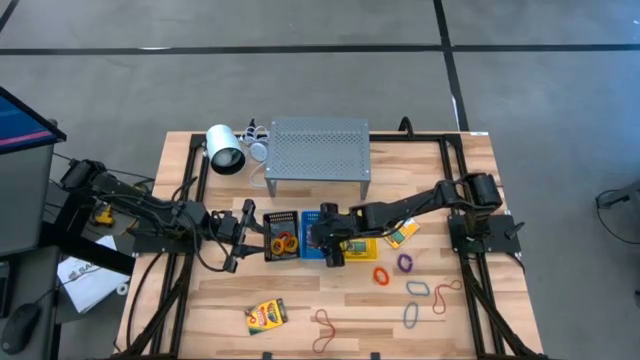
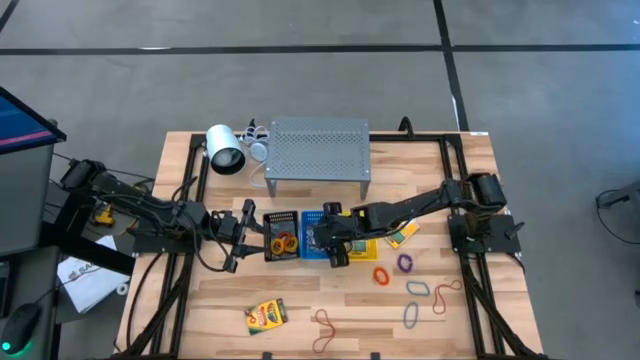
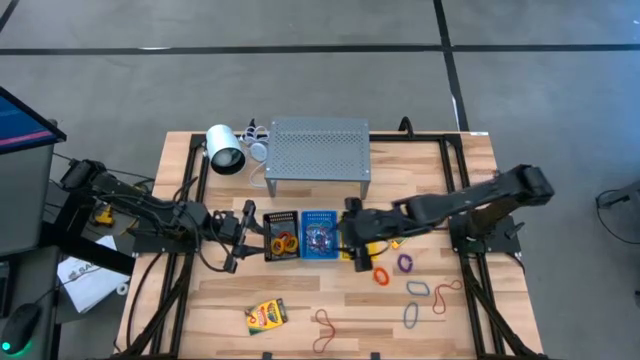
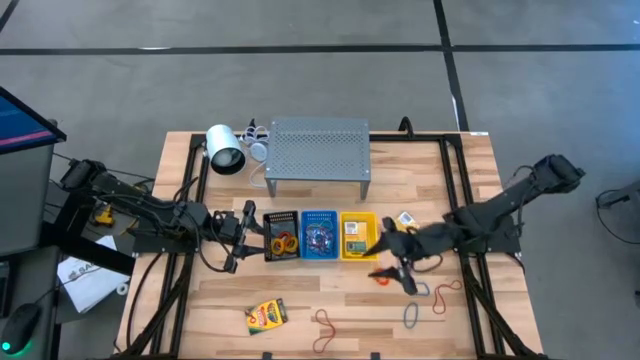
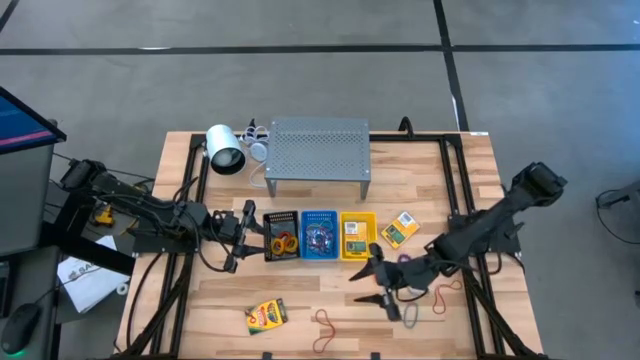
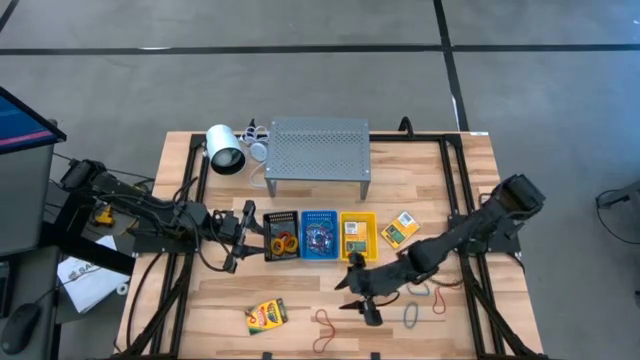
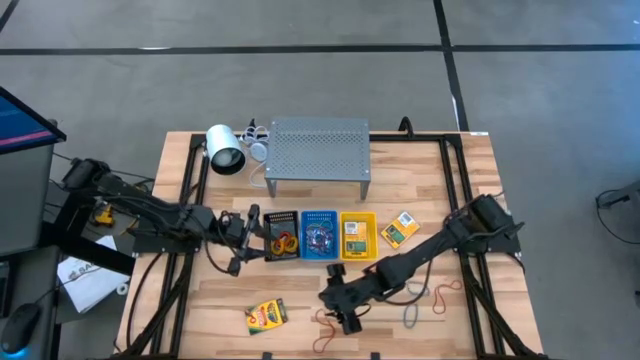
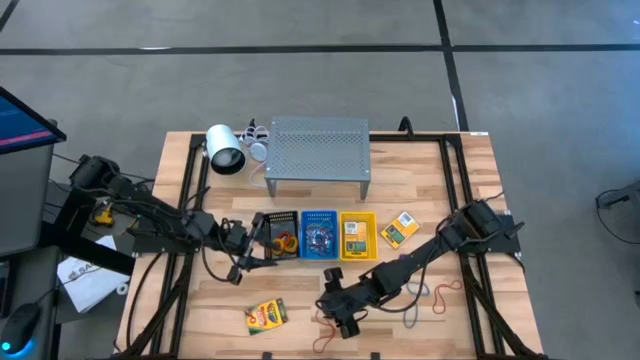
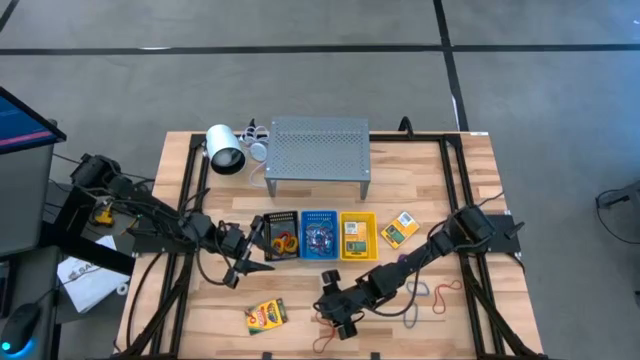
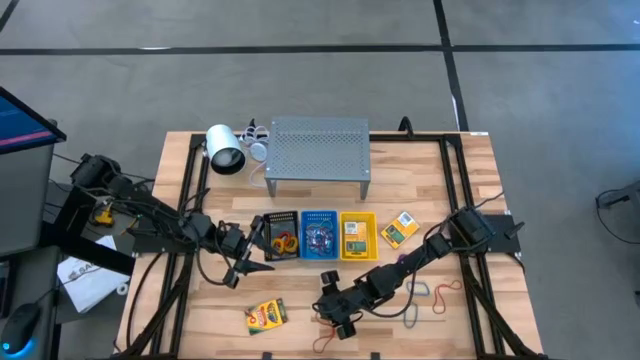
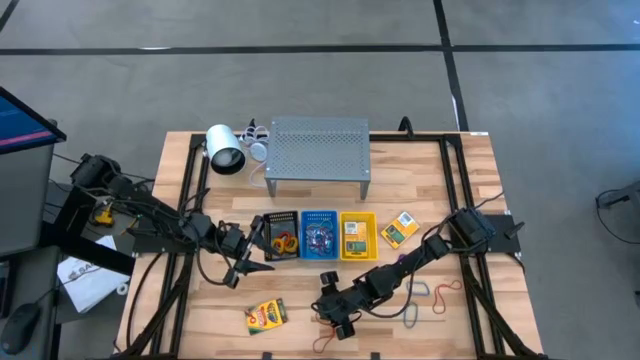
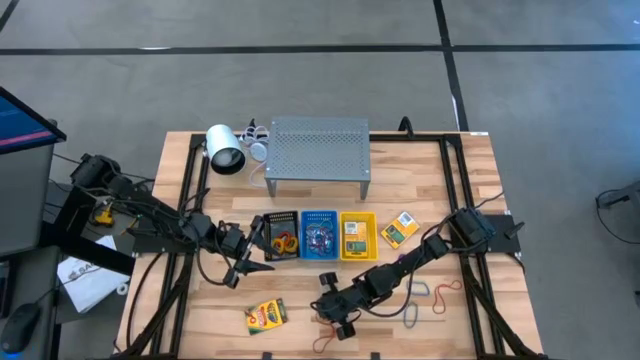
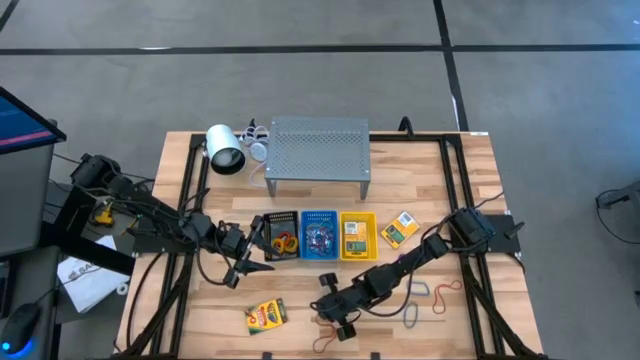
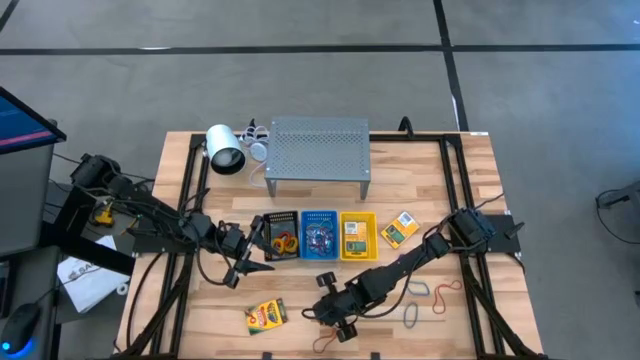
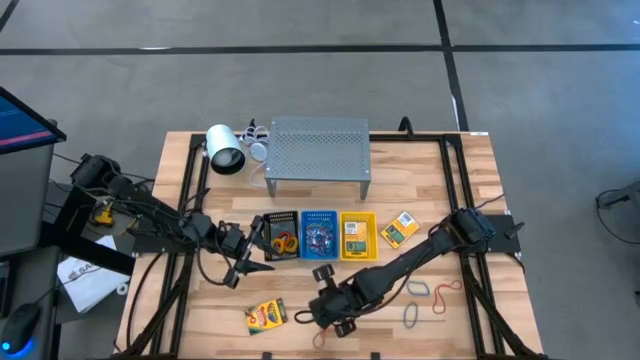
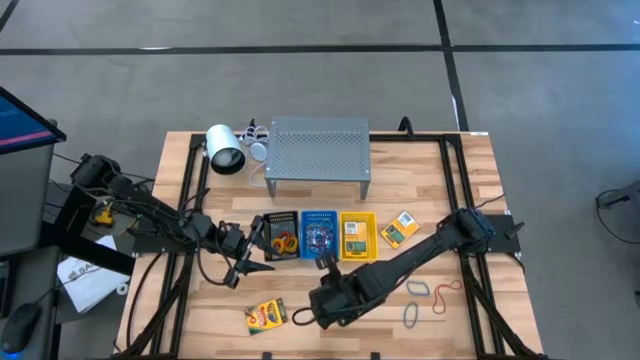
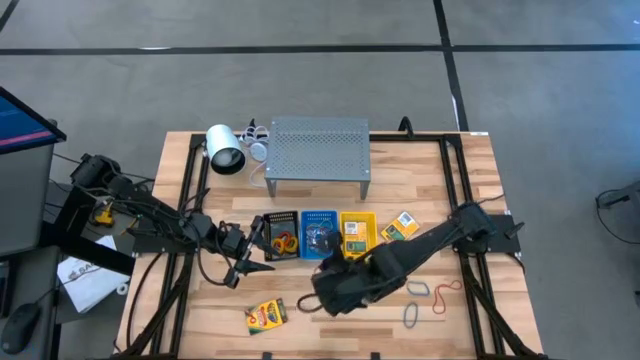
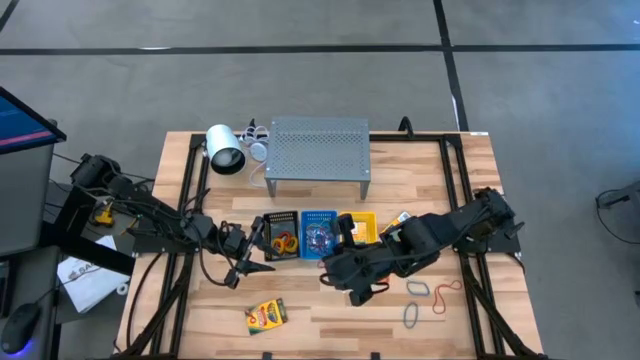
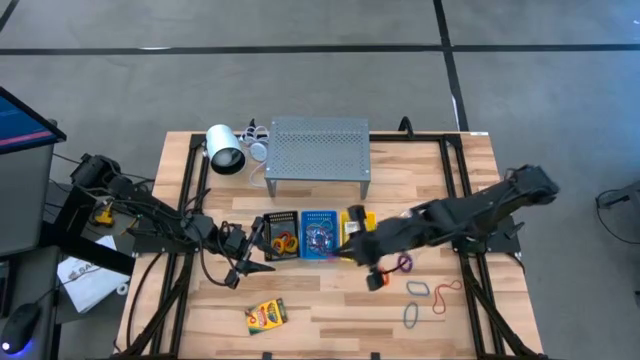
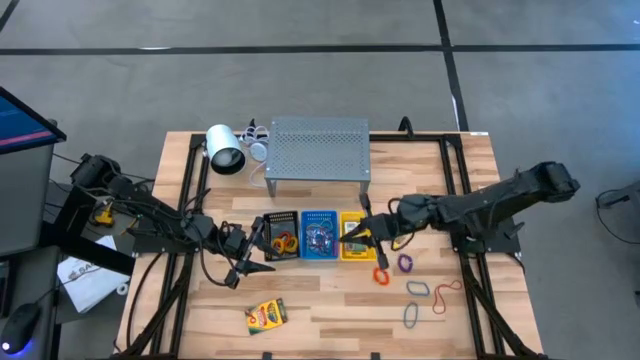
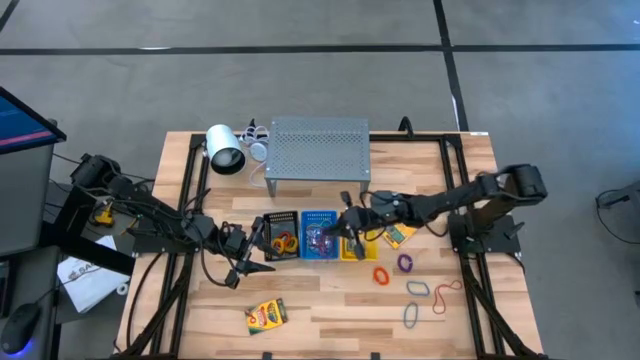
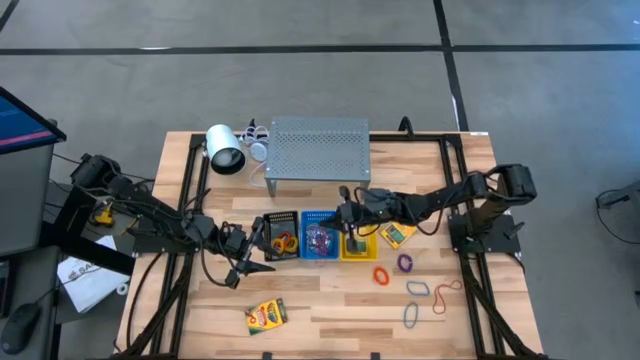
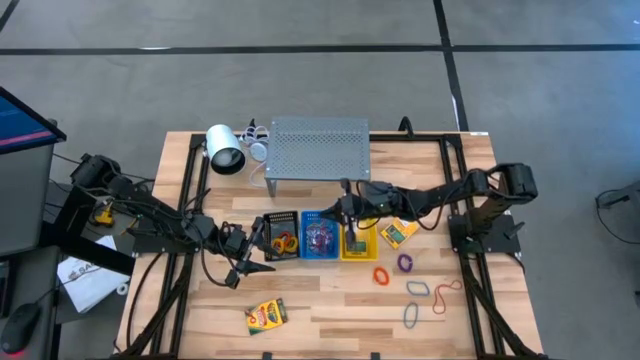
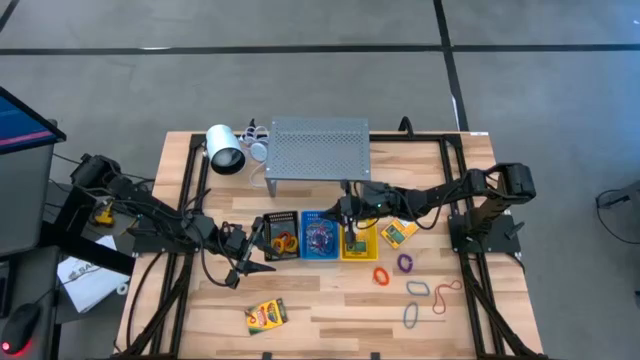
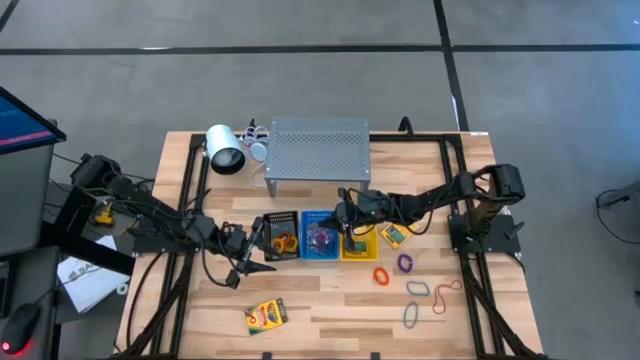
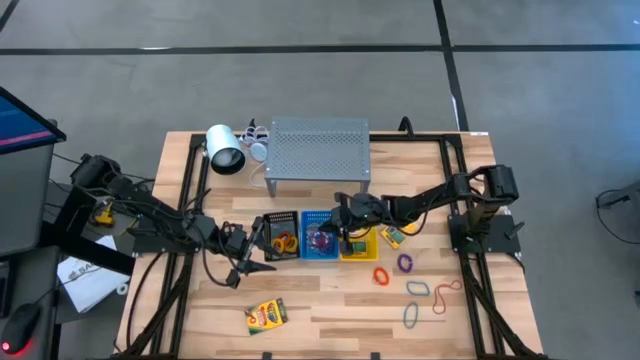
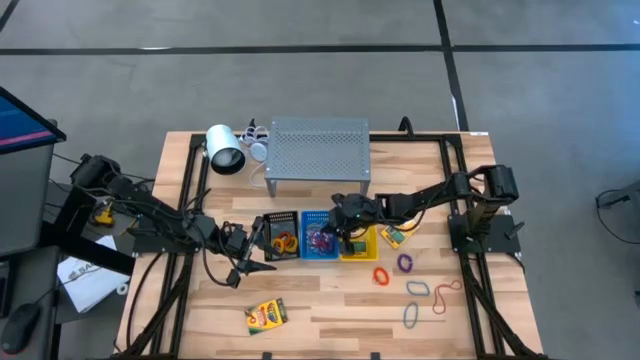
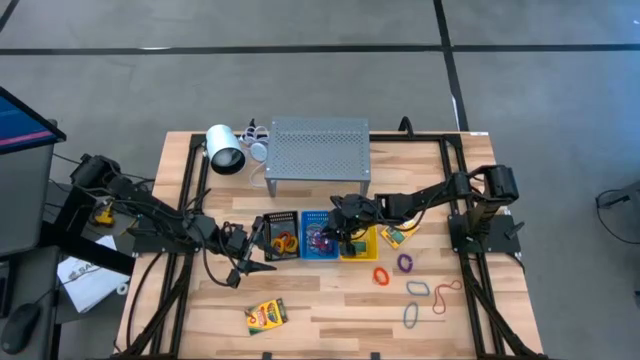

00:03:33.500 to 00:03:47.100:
Task: Pick & Place Office Desk Supplies
Put the red rubber band into the blue basket

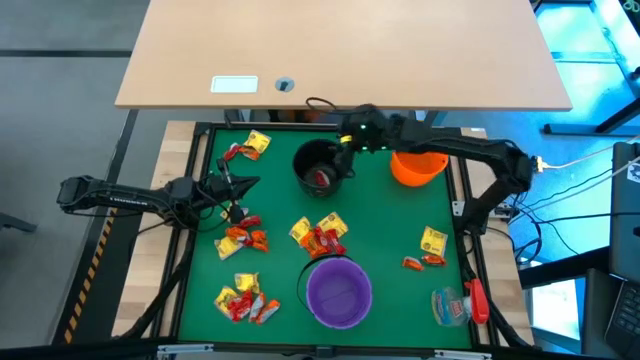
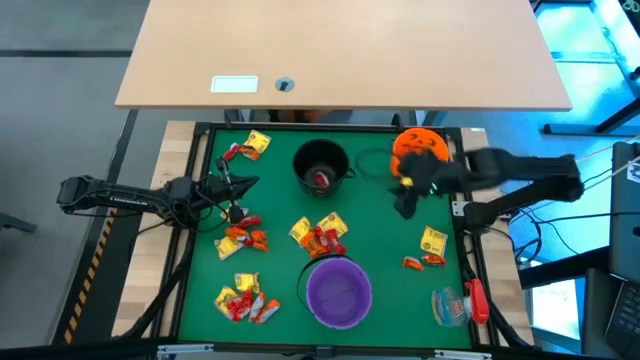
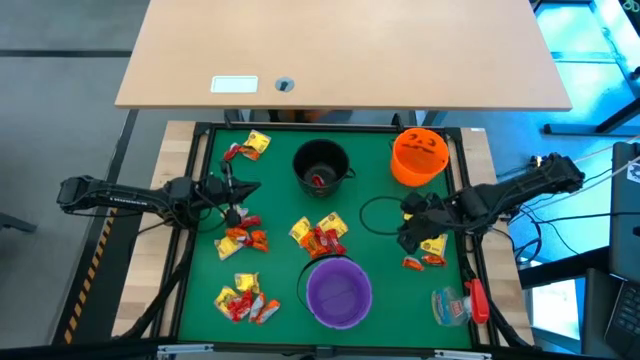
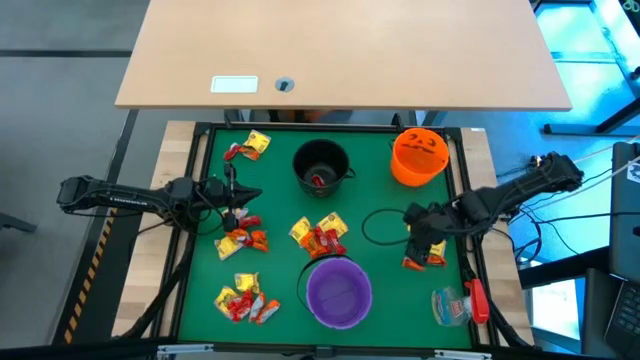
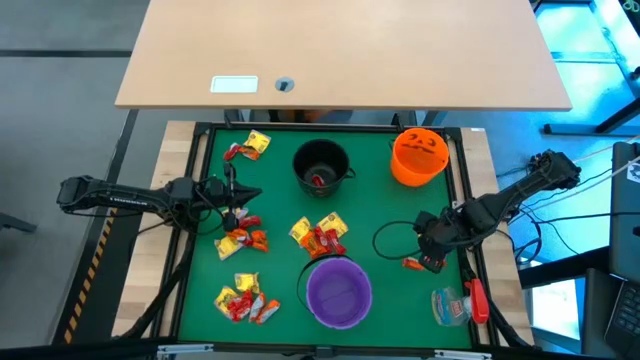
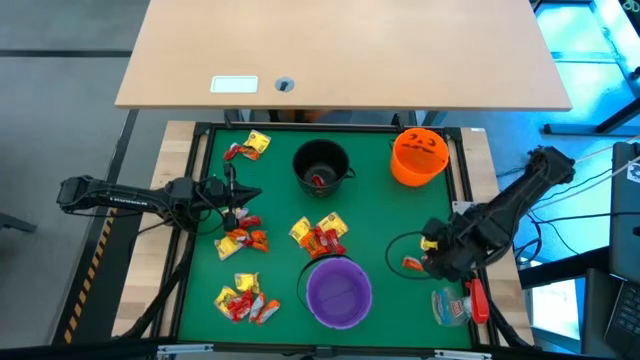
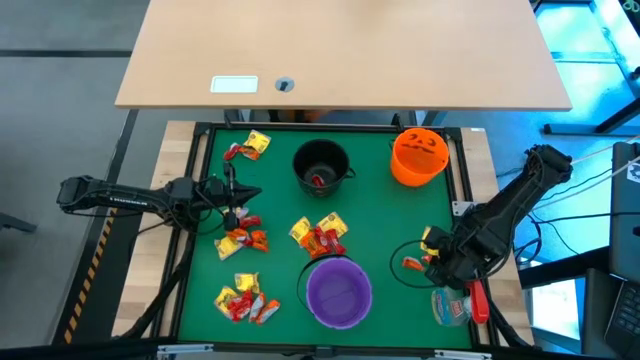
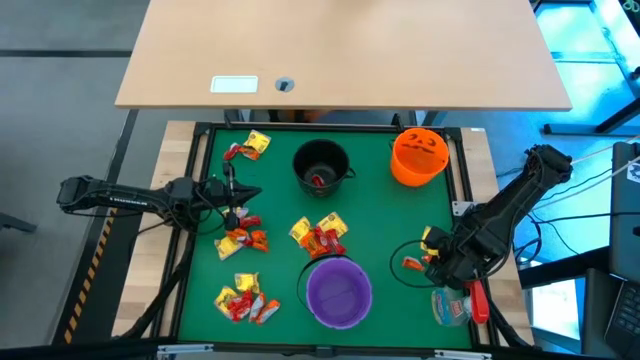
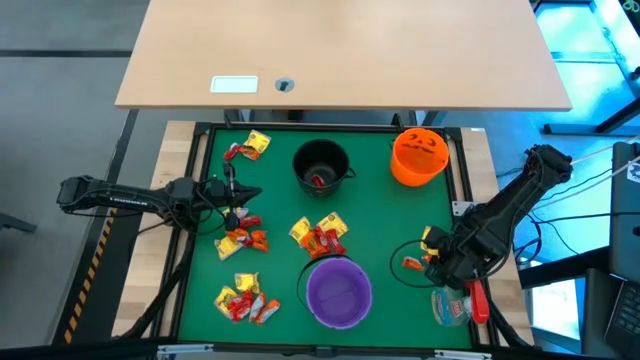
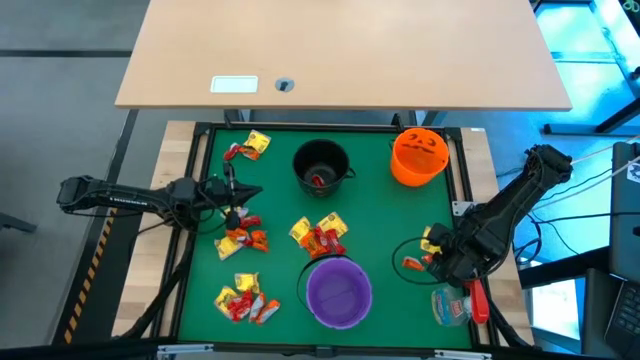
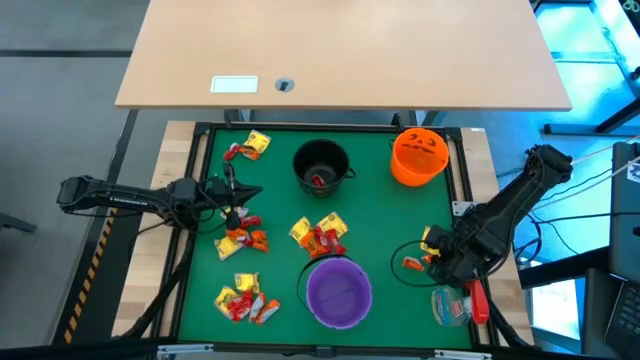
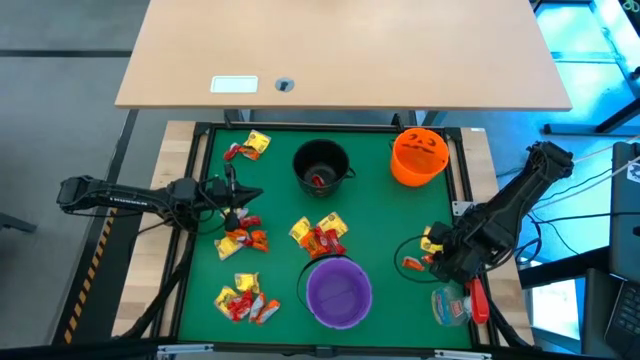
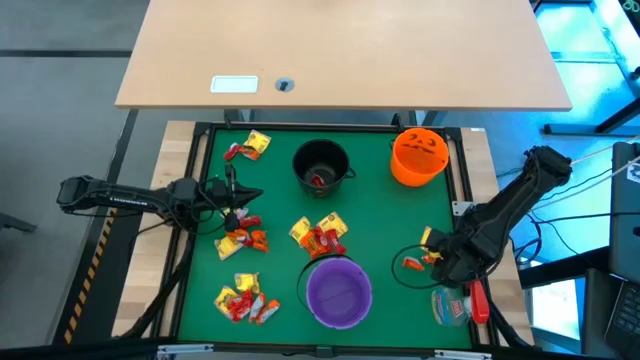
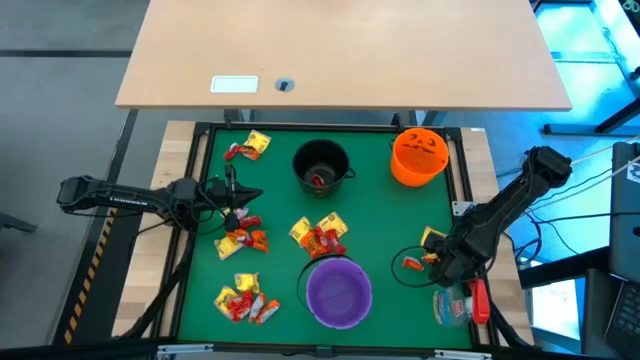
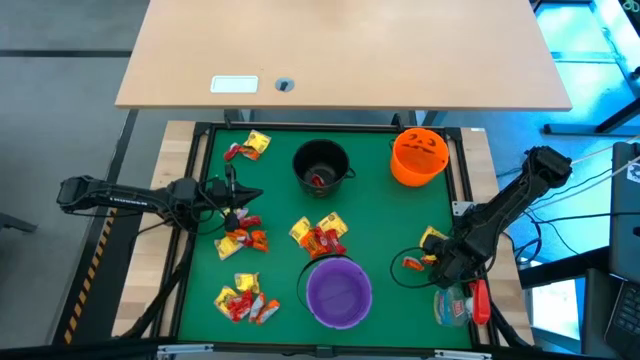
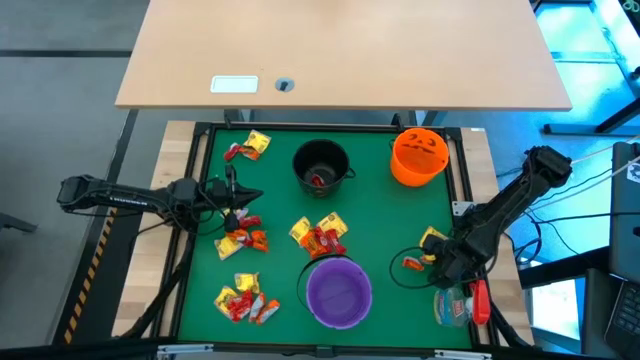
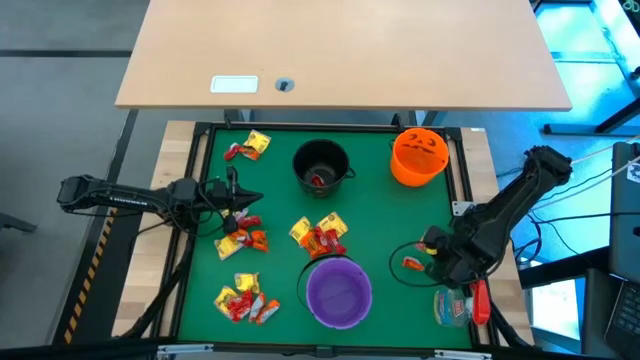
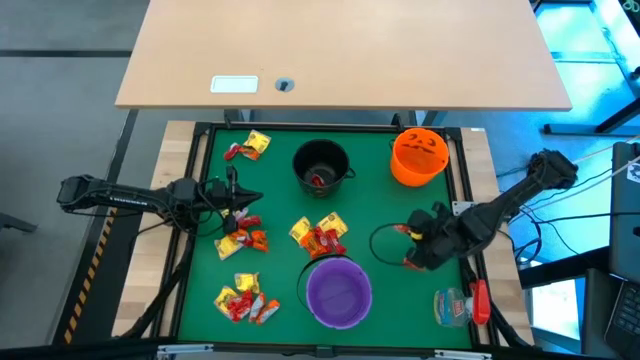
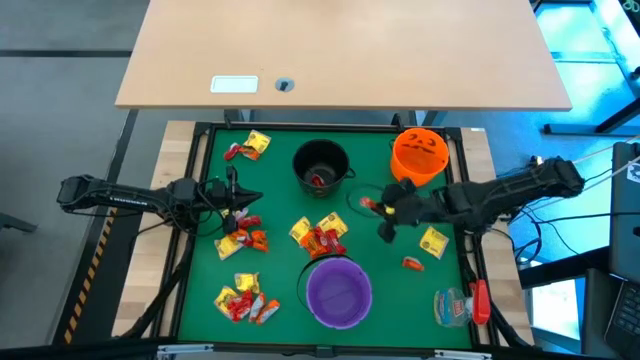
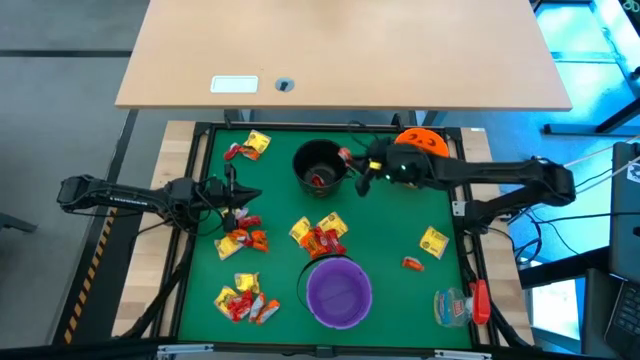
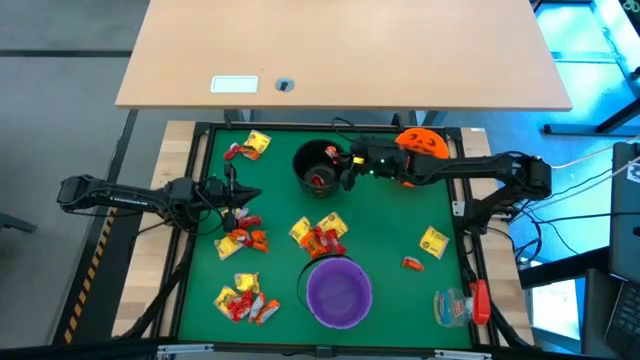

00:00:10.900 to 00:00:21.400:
Task: Sort candy
Put the orange candy into the black bucket
